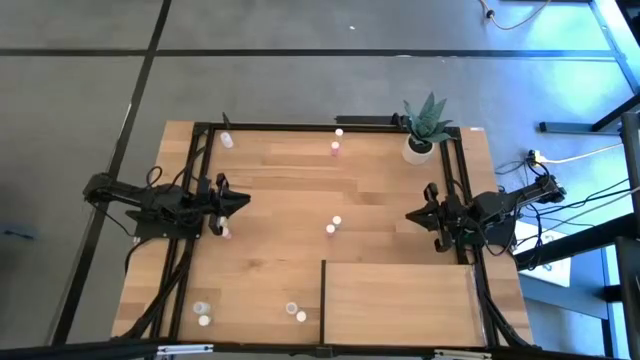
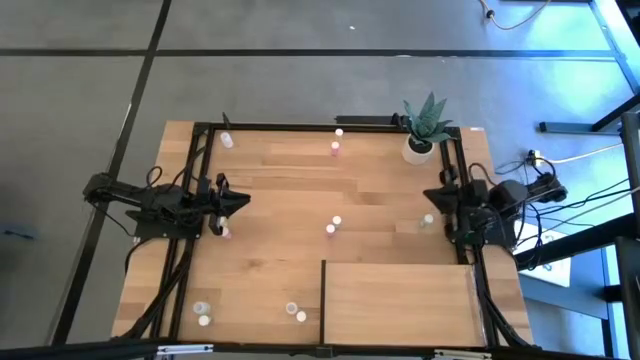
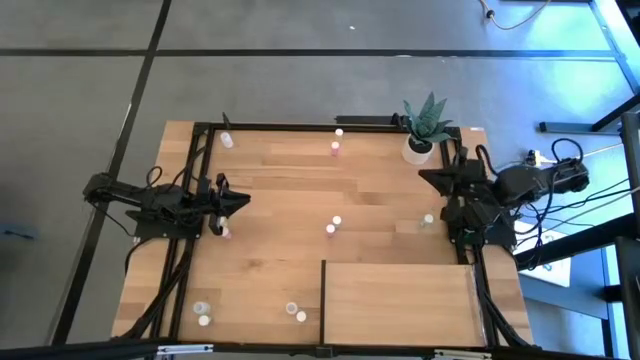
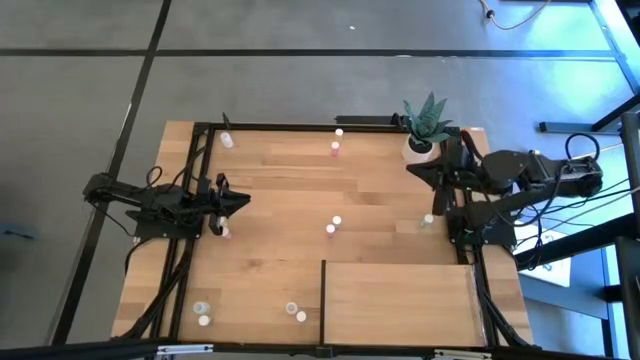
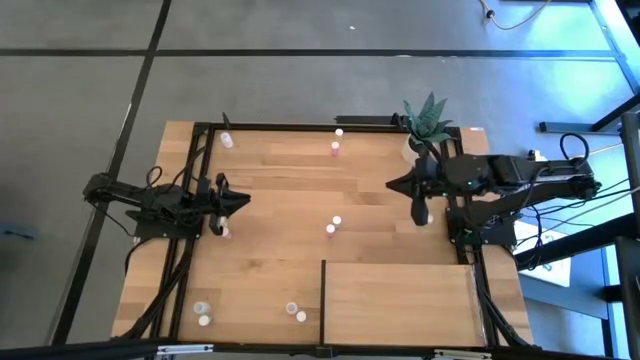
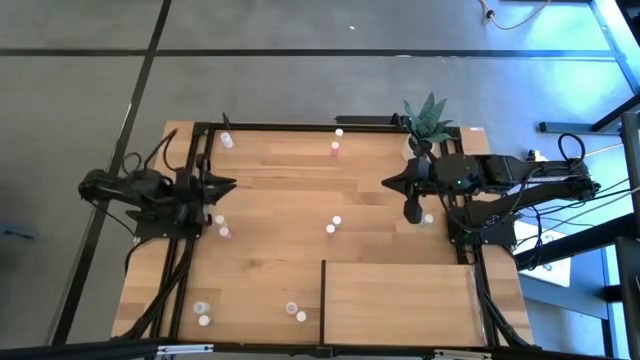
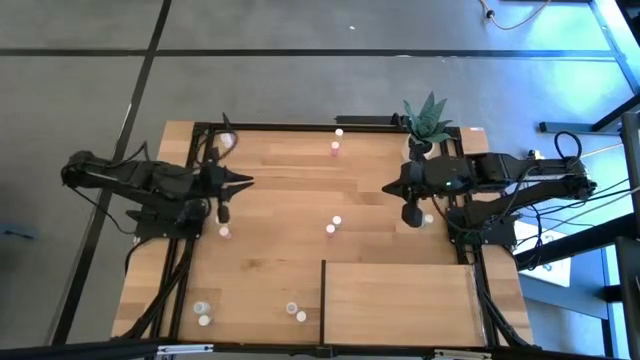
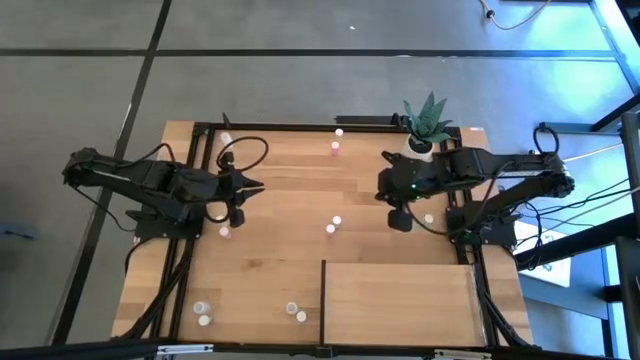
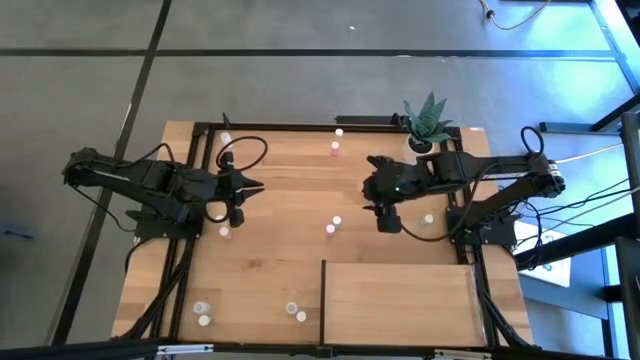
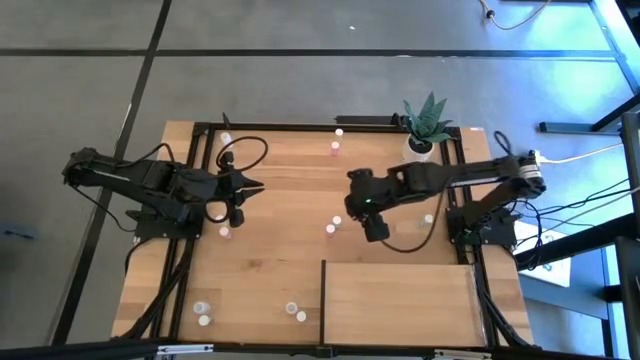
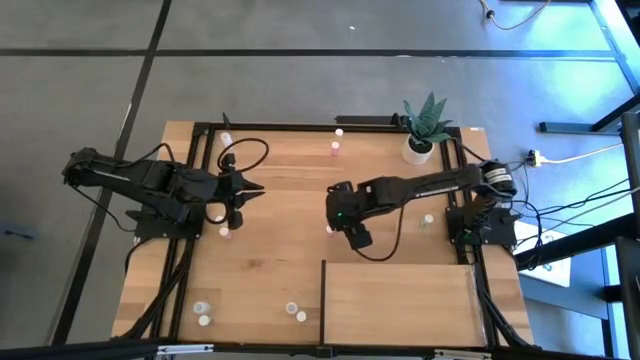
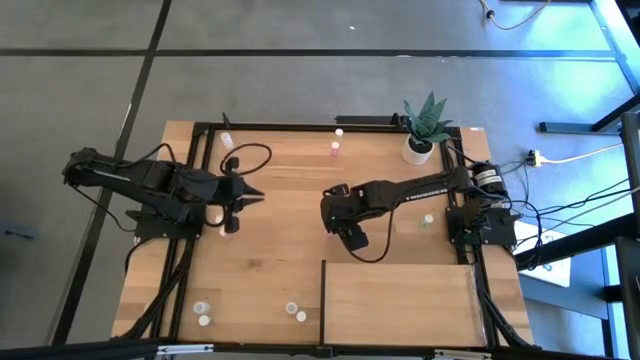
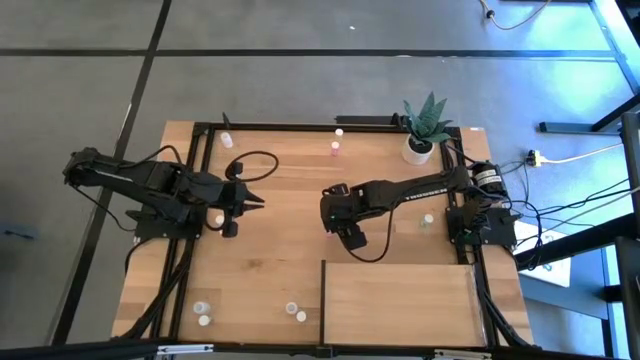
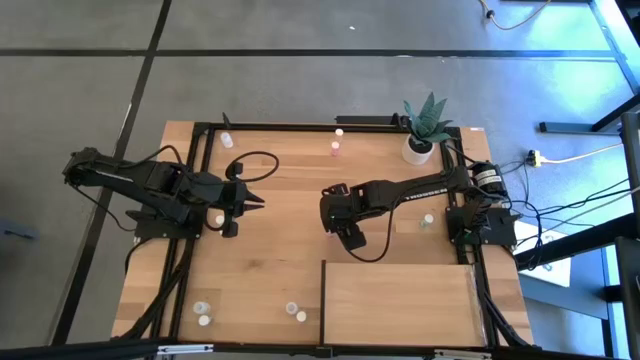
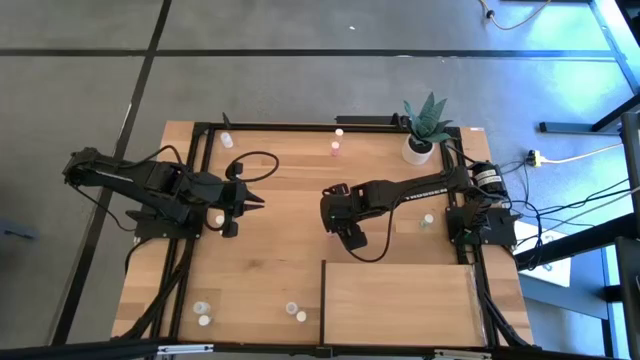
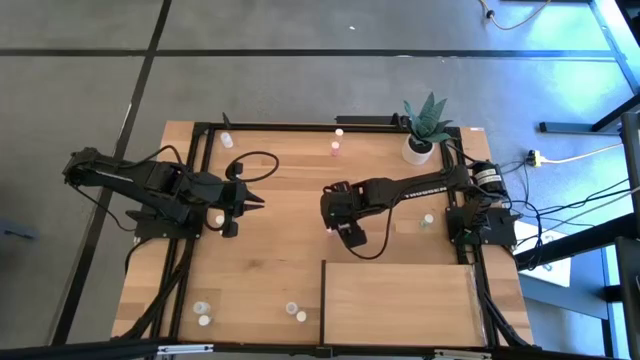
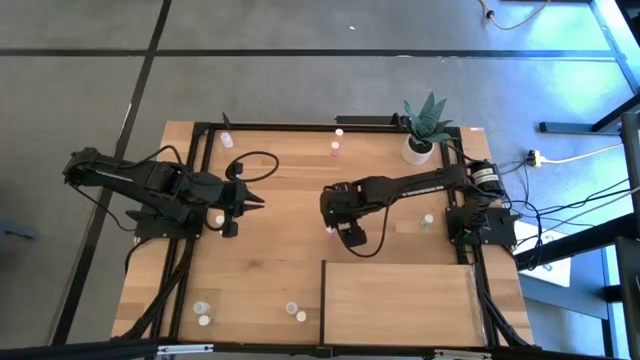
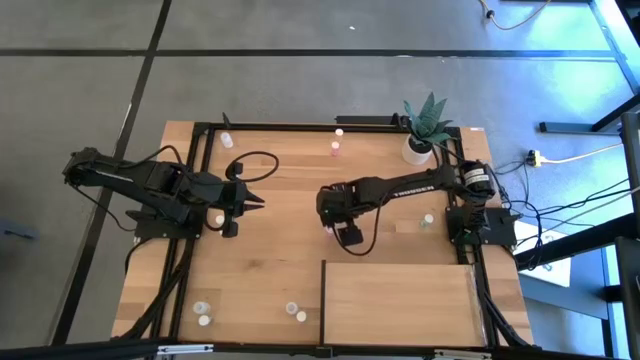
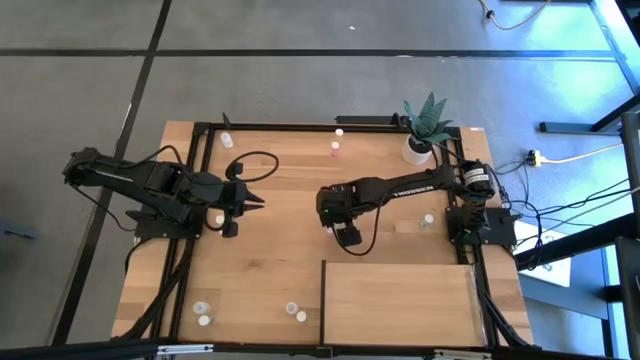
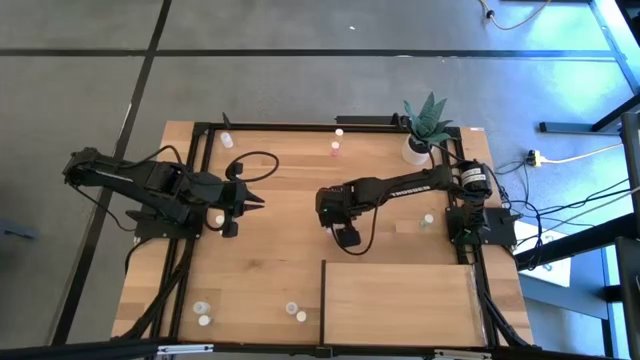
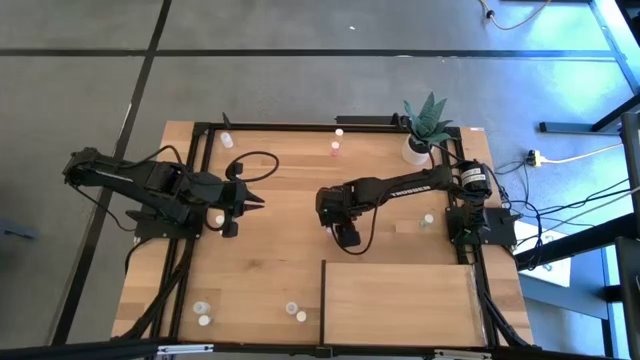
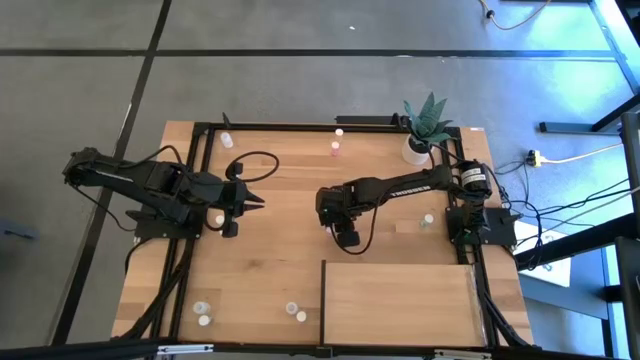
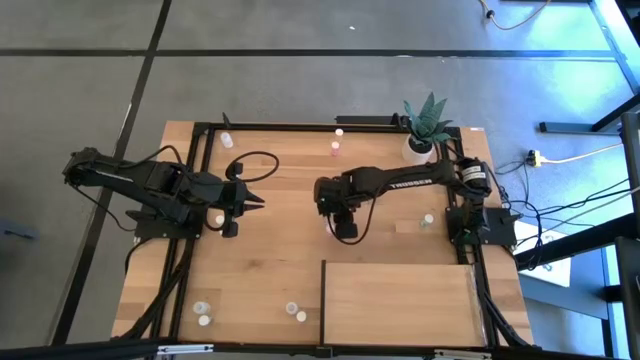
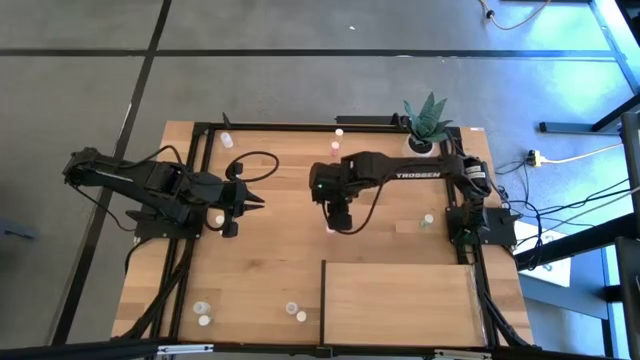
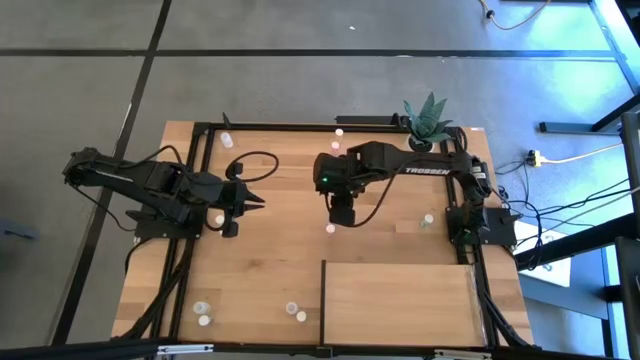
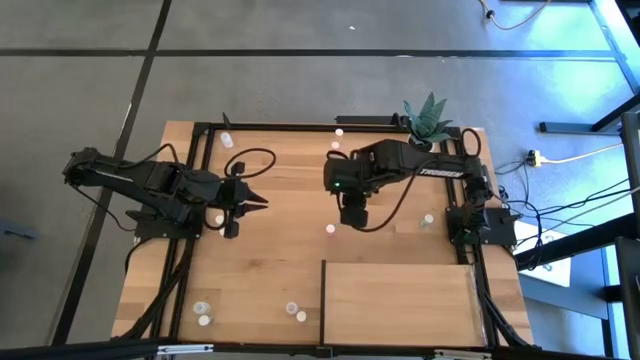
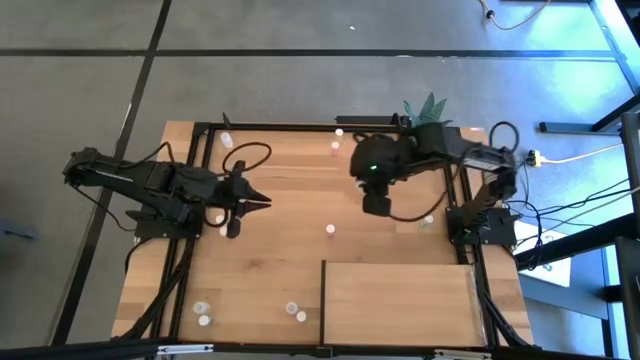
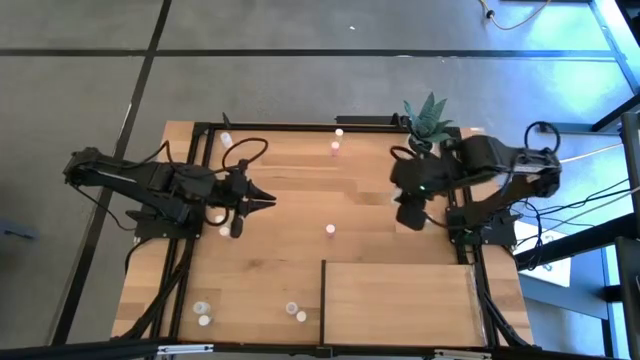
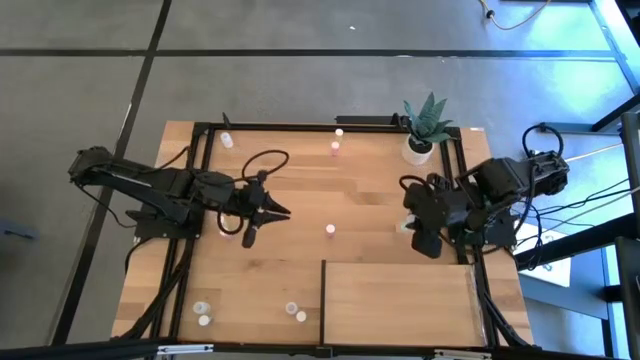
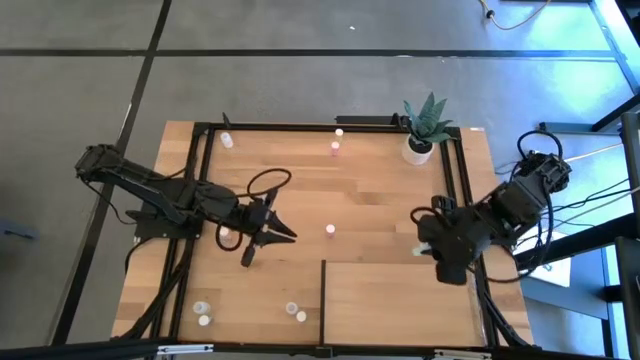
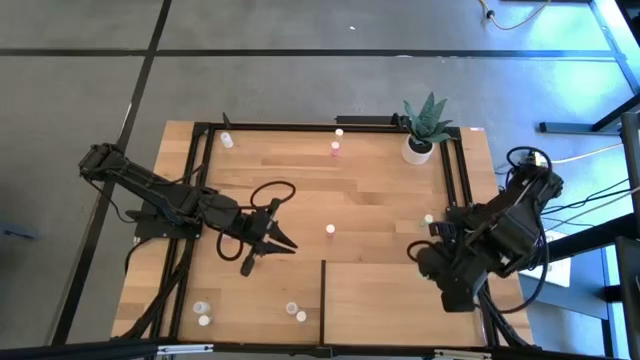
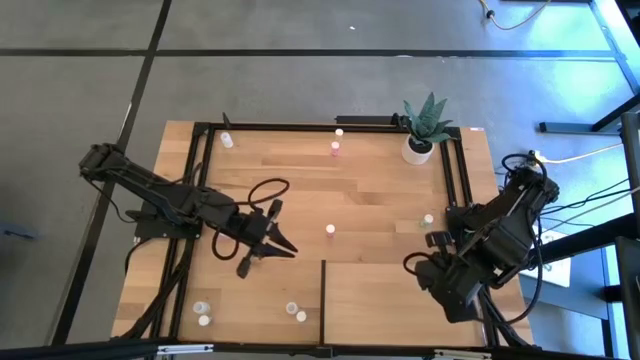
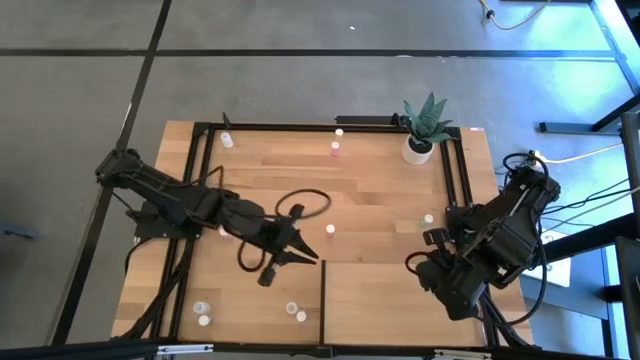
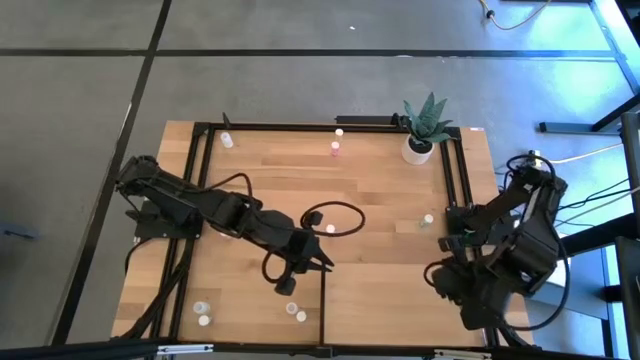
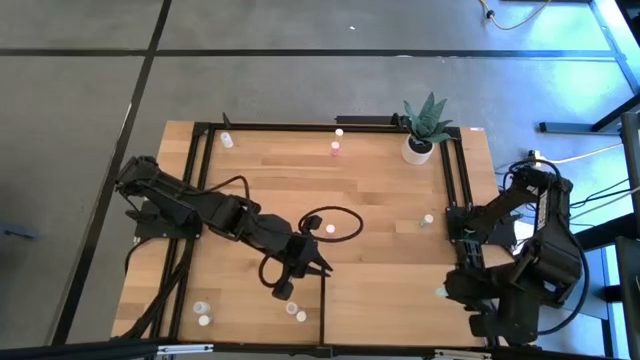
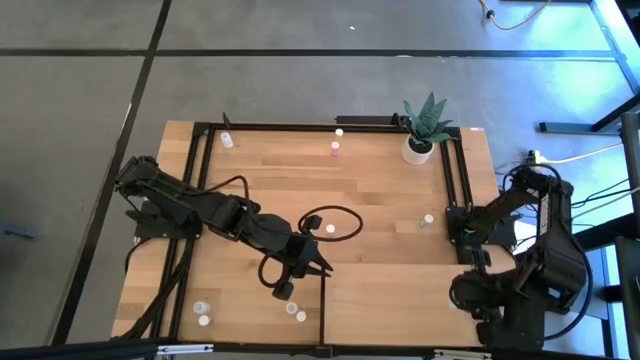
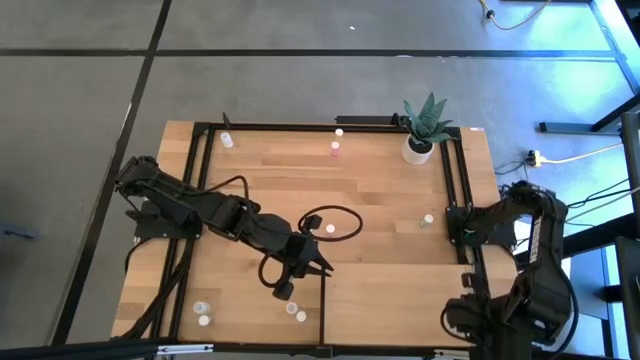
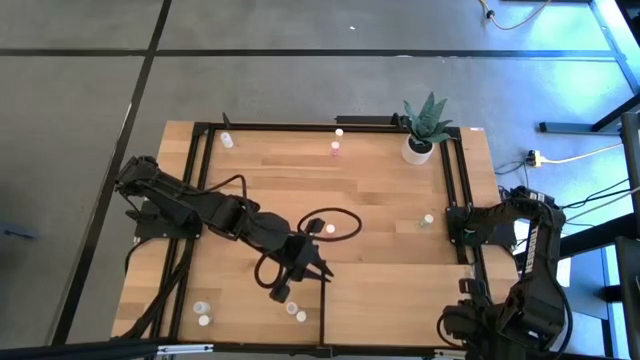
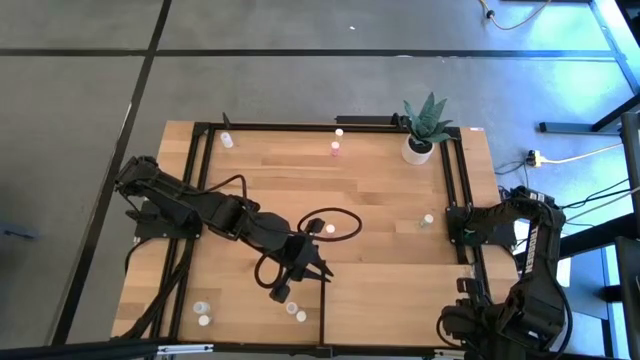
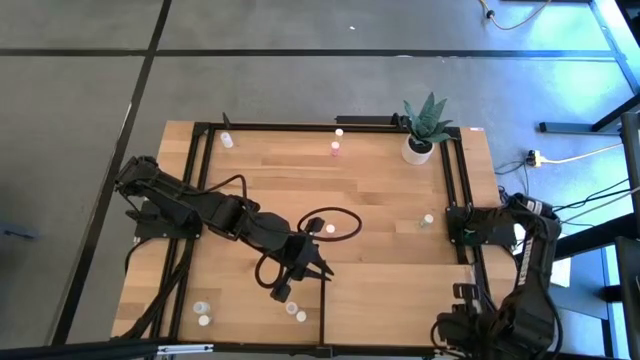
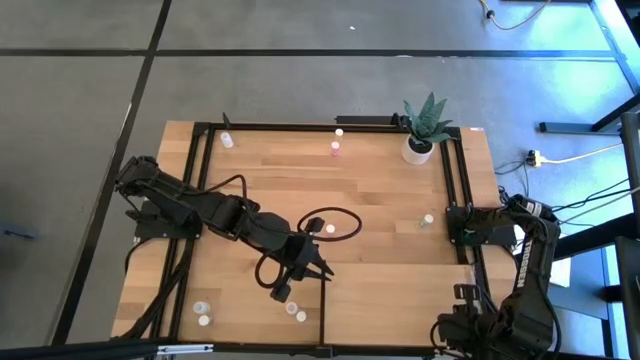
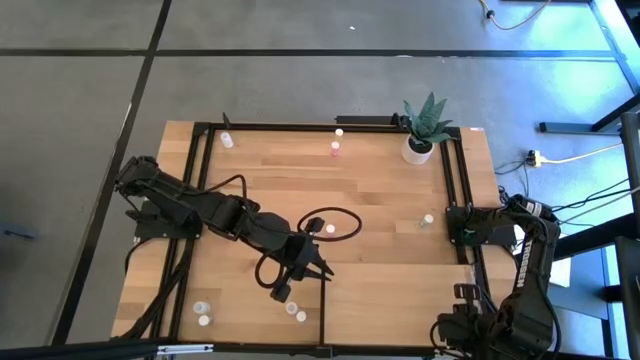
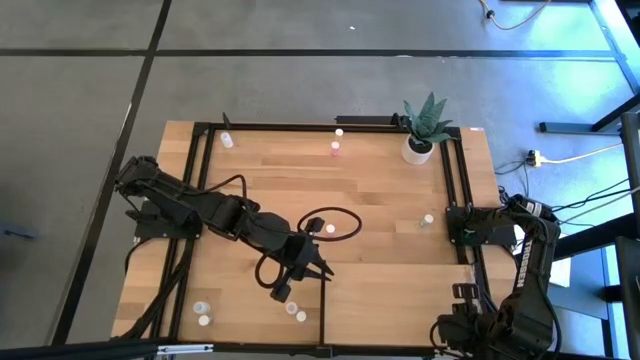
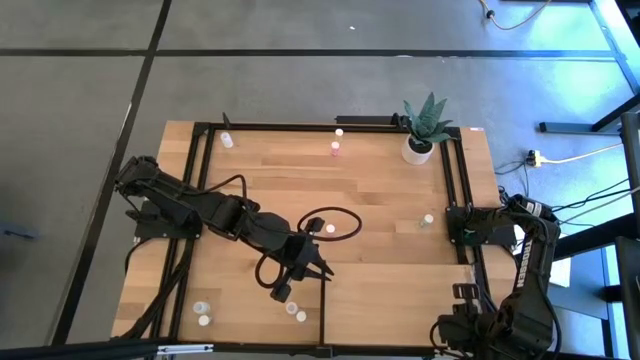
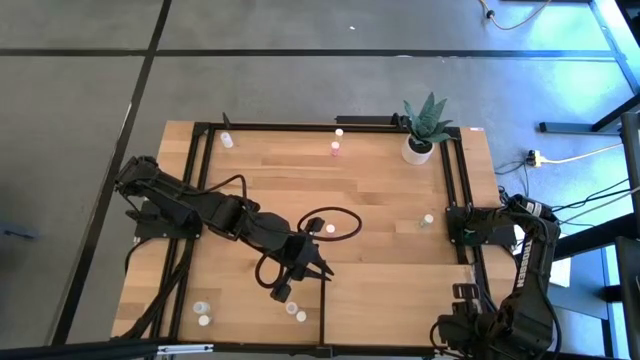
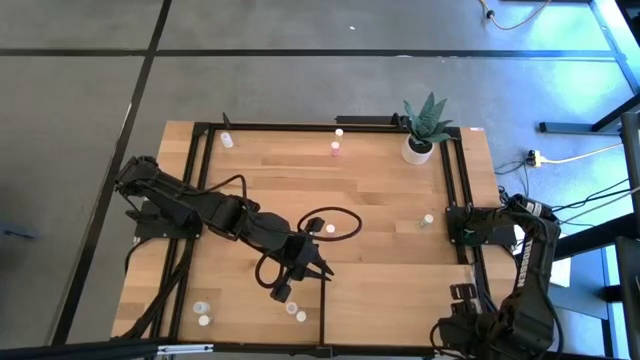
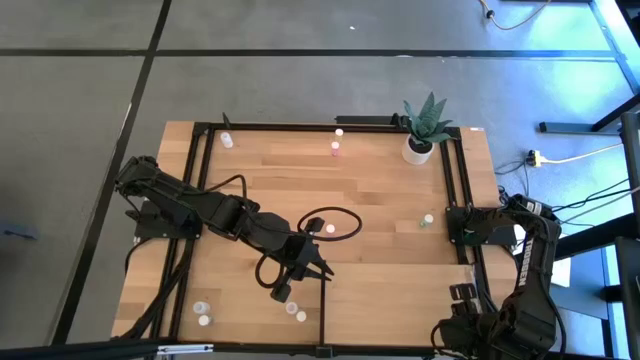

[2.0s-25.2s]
Task: Pick and place medicine bottles onto shelf by color
Put the top left blue pill bottle on the shelf
